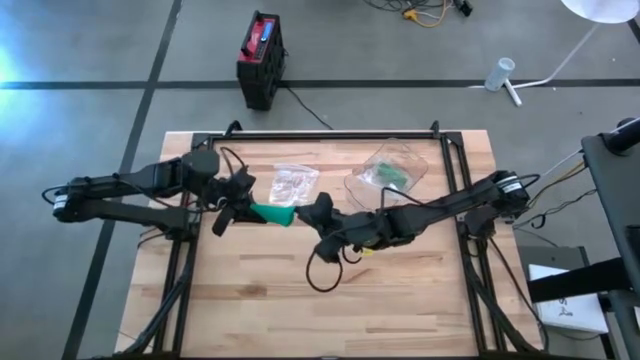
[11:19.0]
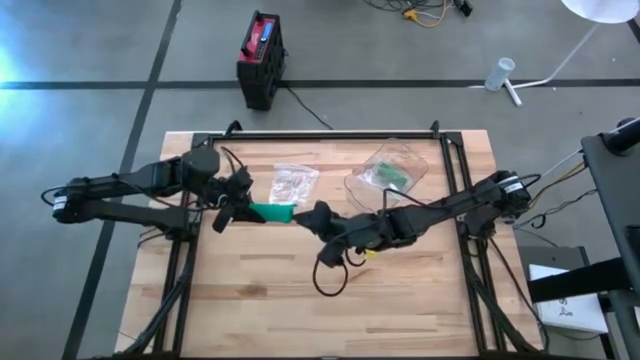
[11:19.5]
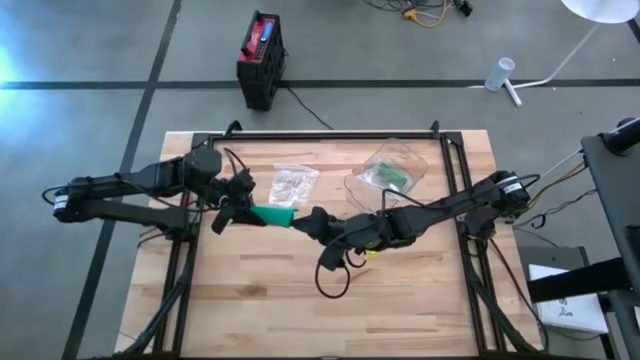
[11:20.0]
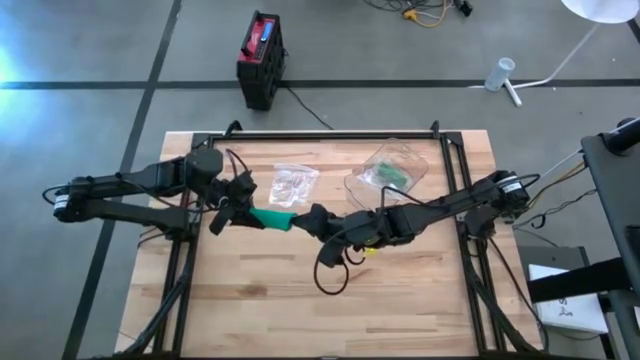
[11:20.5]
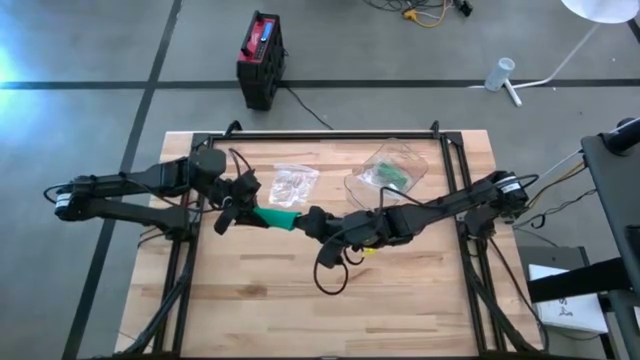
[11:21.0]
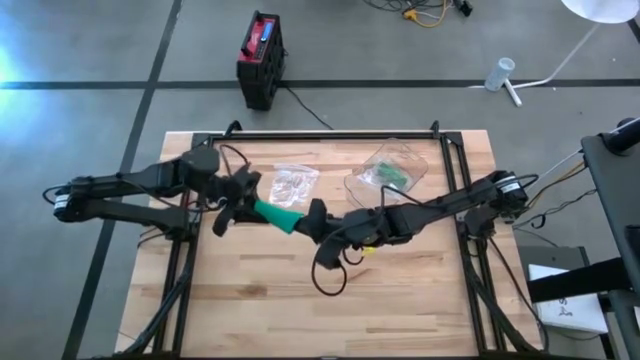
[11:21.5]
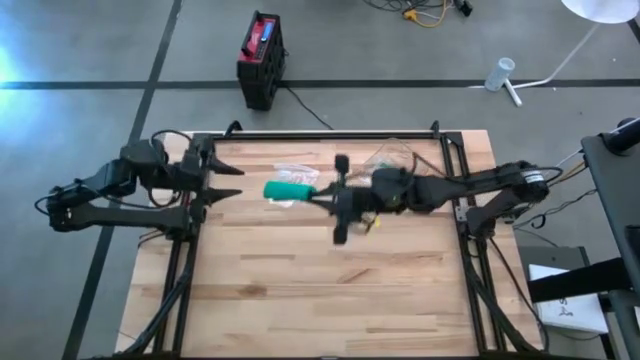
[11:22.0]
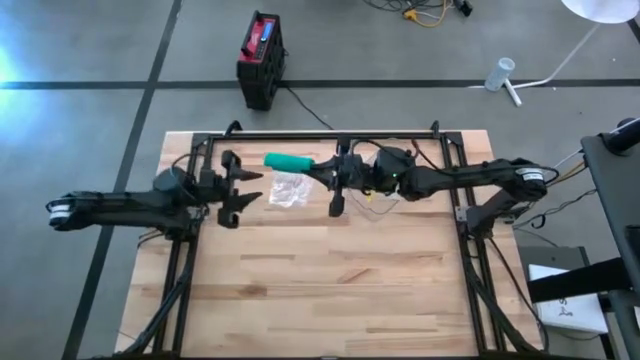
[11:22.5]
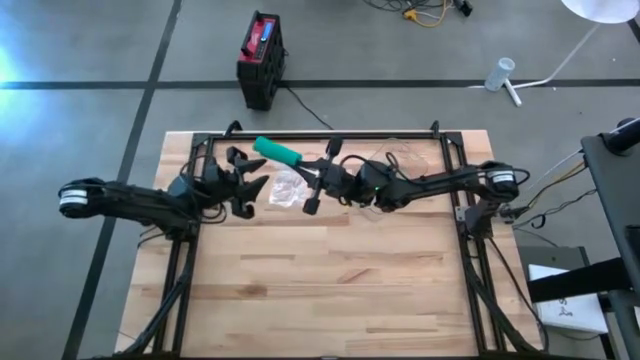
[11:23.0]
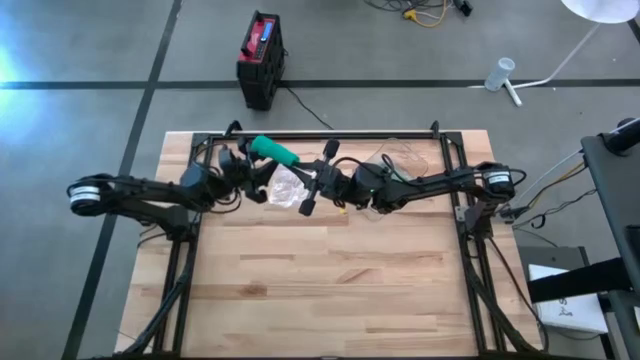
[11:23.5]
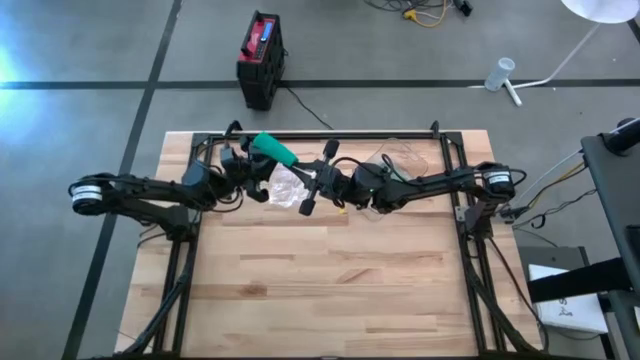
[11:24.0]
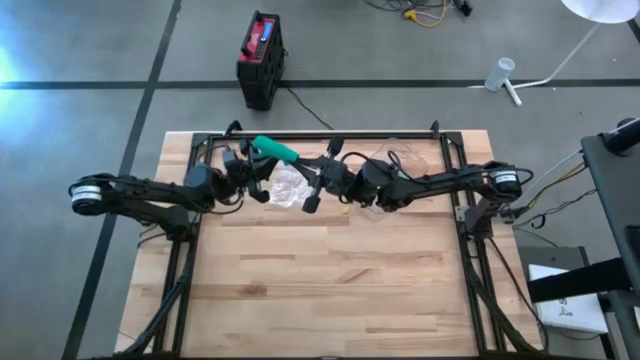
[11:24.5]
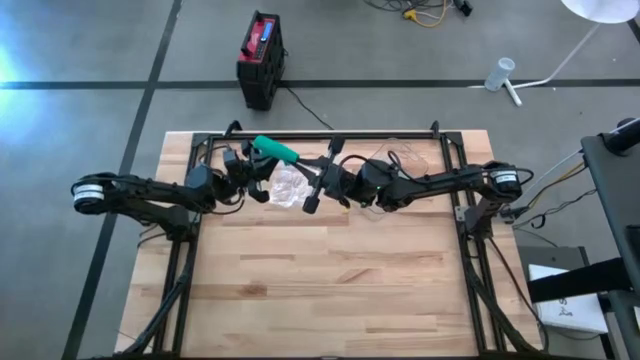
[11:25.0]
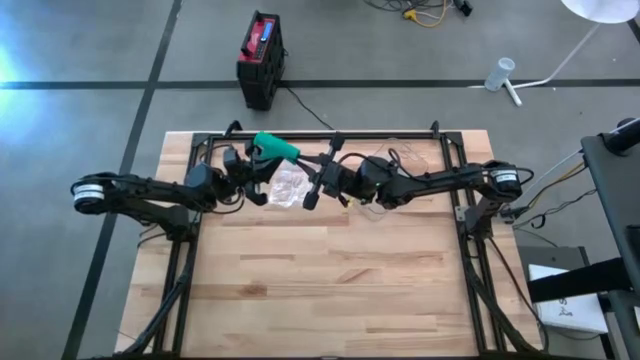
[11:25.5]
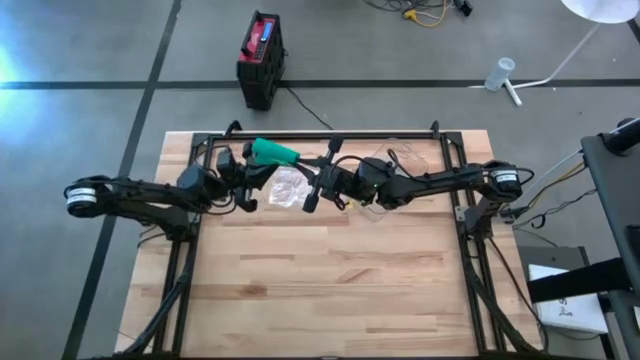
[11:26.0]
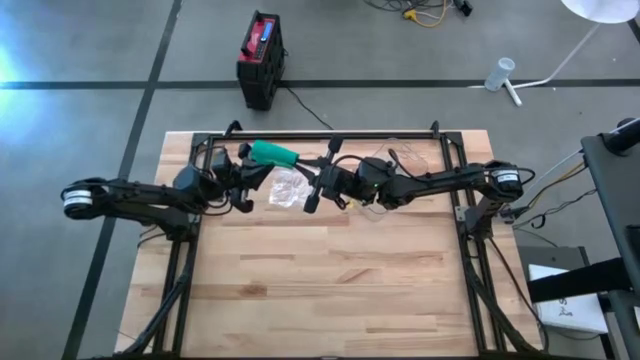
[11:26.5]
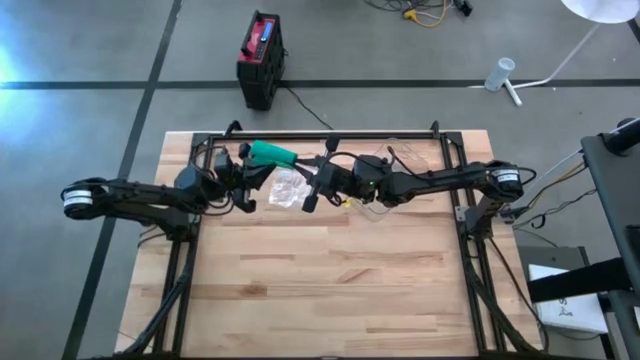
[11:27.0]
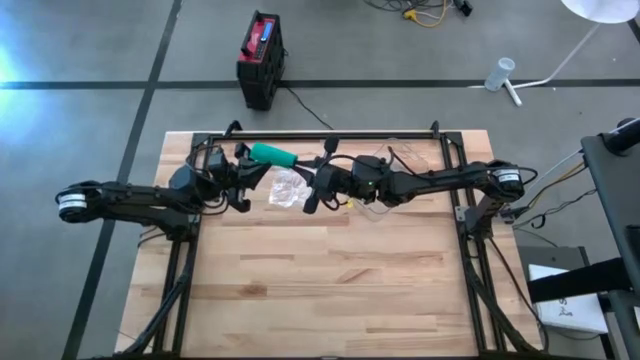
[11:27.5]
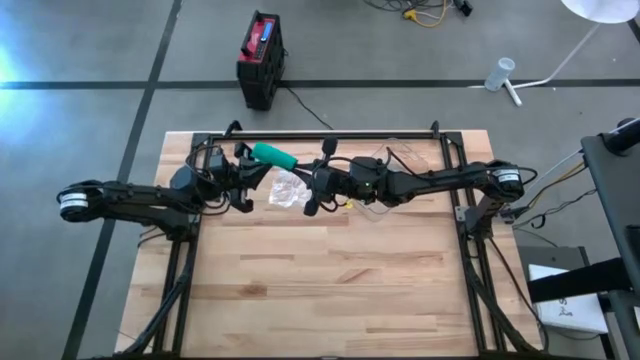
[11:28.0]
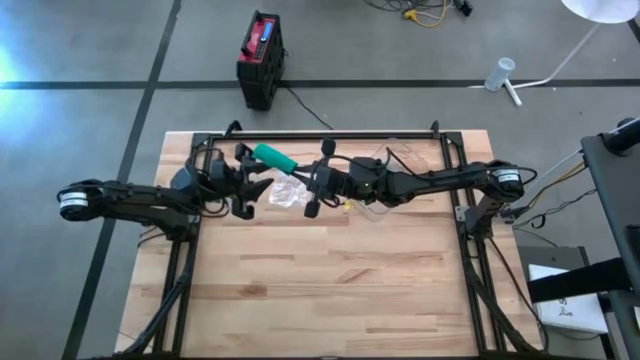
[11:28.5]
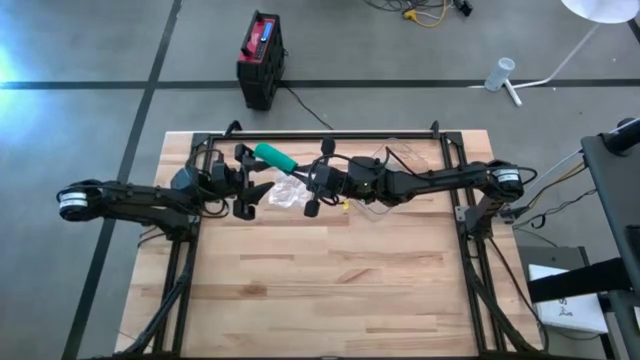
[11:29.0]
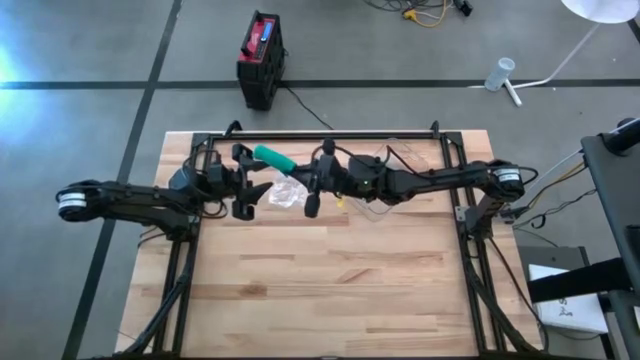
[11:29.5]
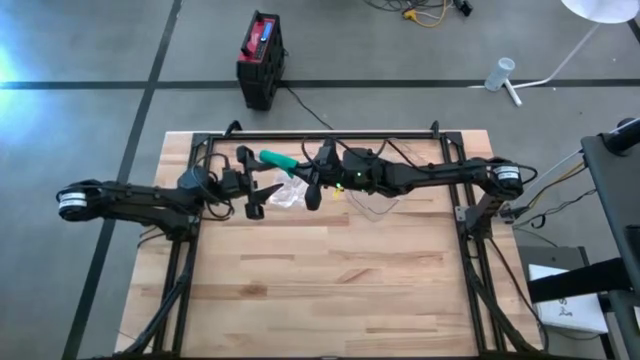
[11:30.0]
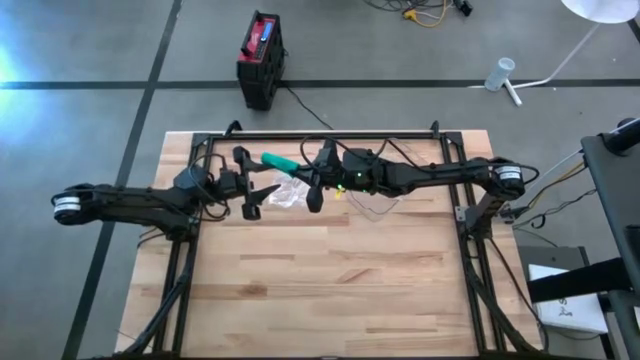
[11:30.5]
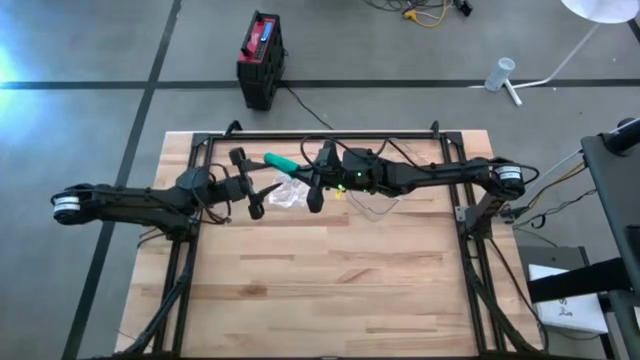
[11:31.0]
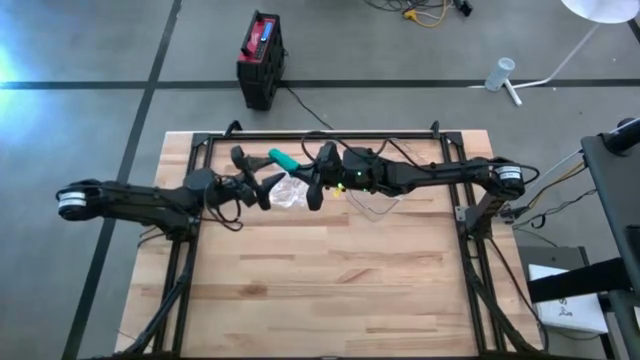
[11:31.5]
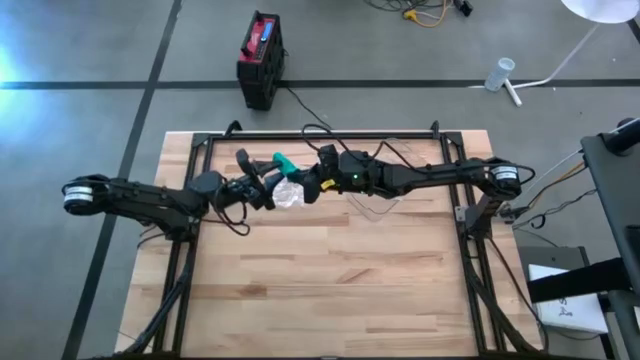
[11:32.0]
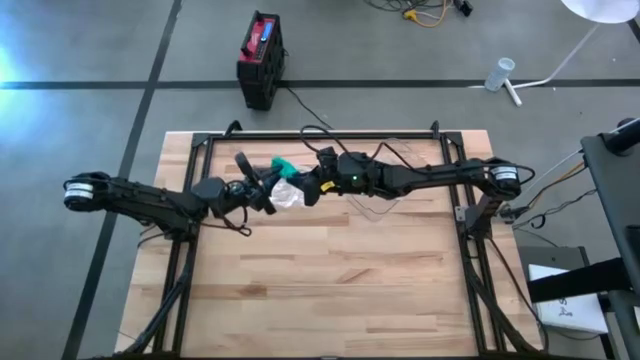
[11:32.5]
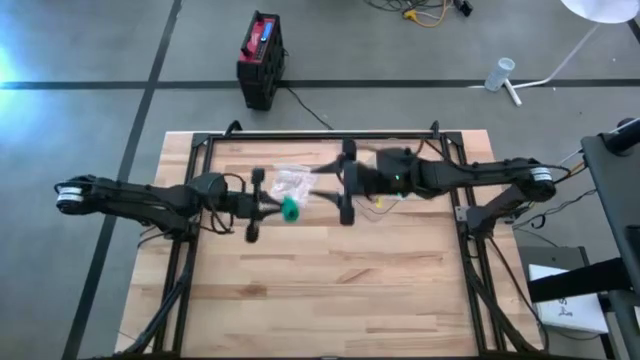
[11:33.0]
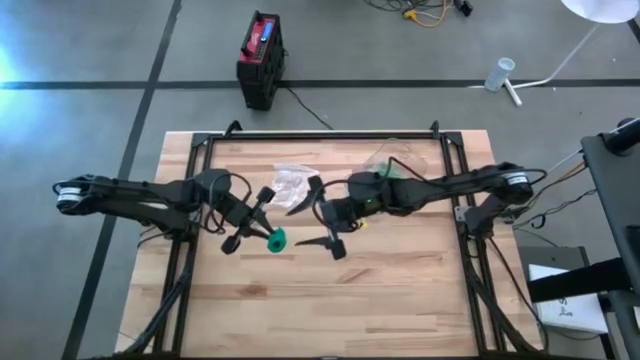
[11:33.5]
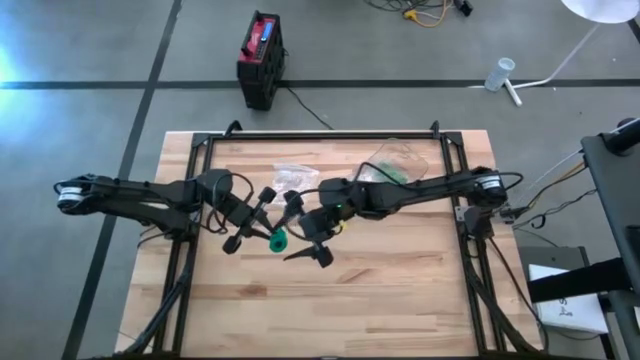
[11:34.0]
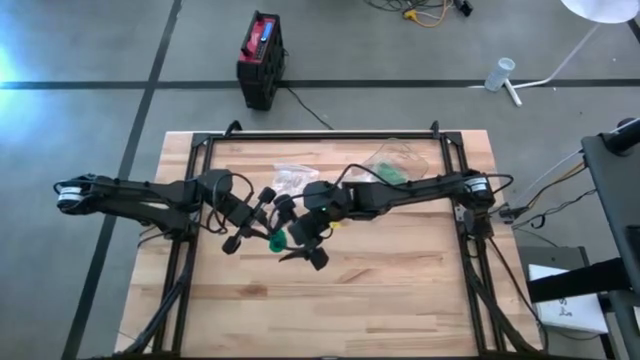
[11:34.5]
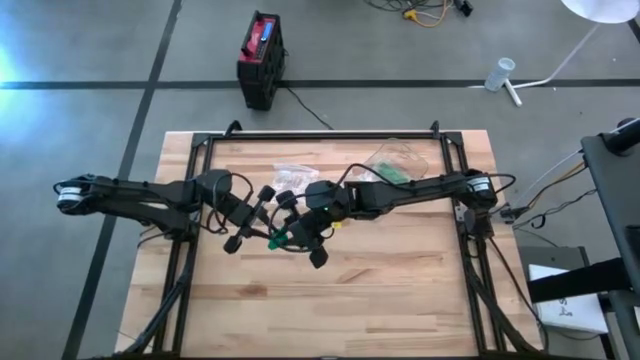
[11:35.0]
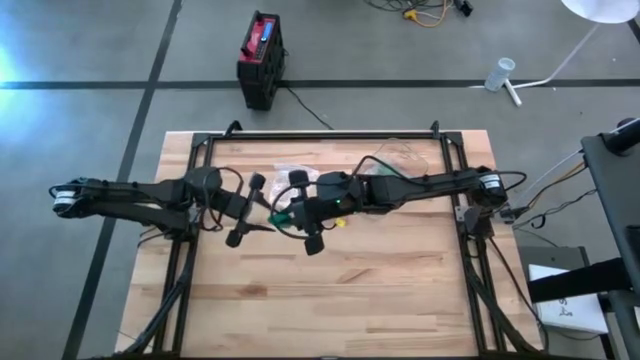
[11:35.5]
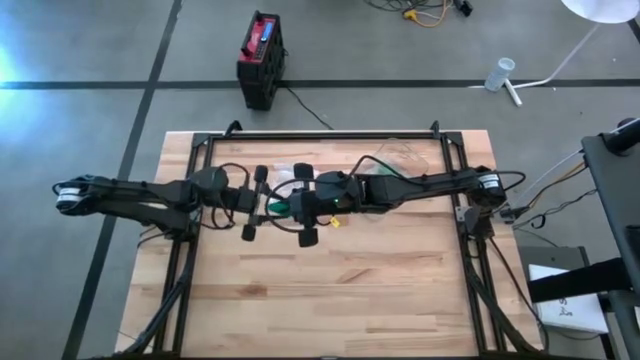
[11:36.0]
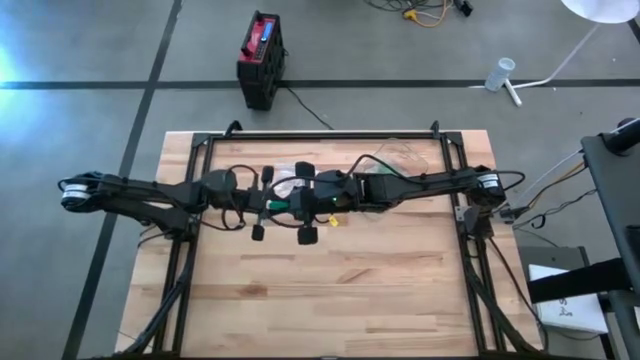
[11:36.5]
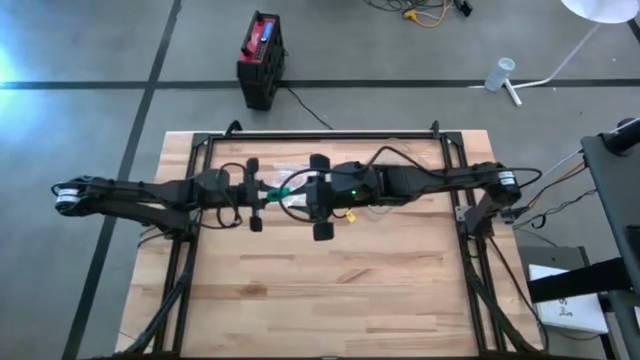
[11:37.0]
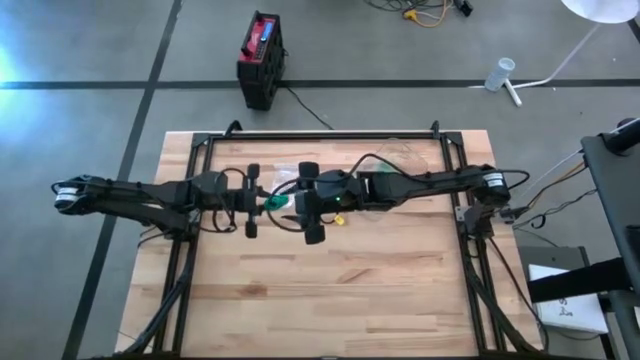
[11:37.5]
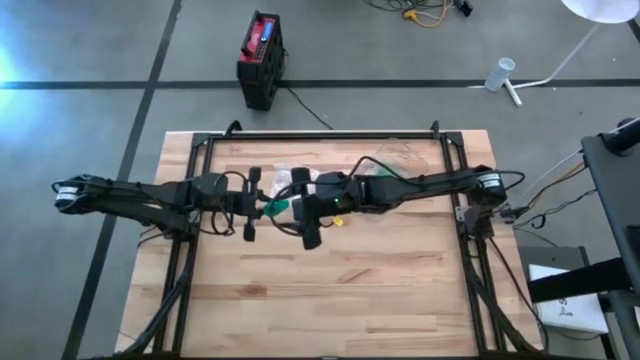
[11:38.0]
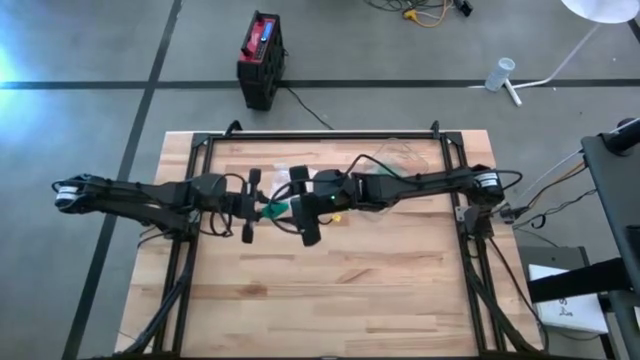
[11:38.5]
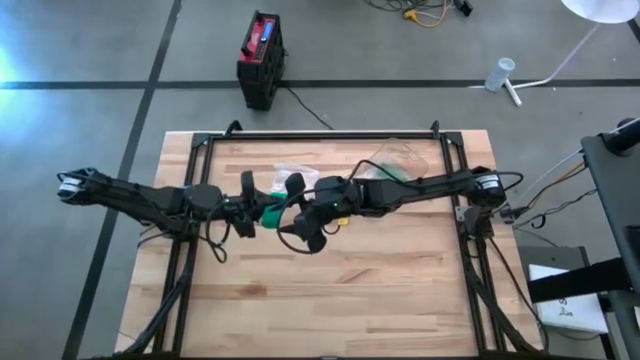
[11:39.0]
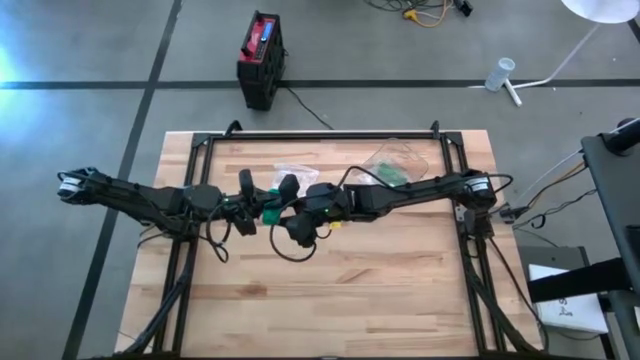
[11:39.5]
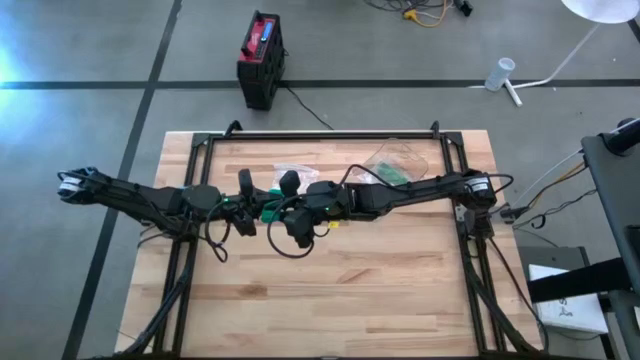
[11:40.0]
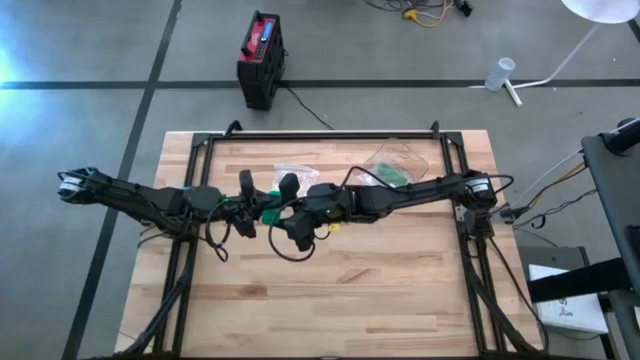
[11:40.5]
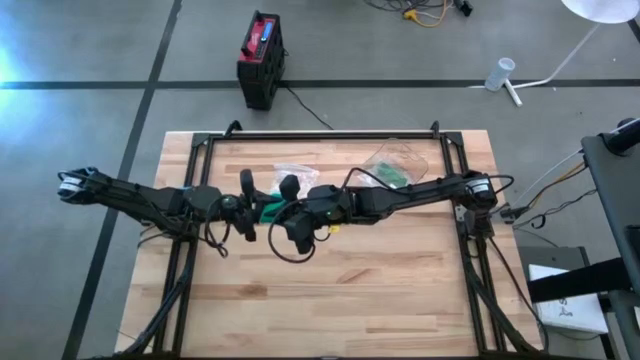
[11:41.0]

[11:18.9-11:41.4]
Task: Roll bandage
Roll the dark green bandage
